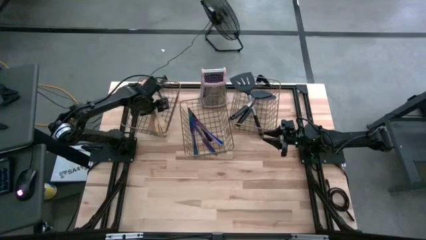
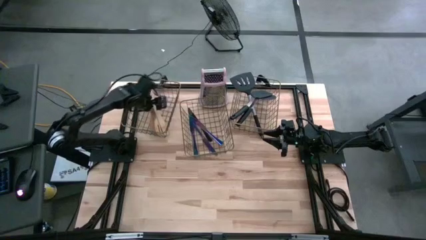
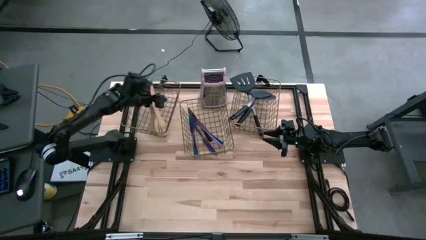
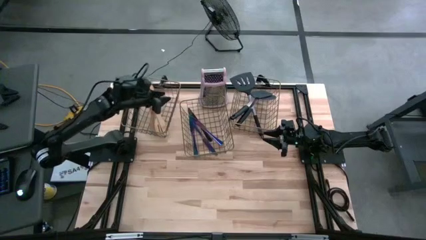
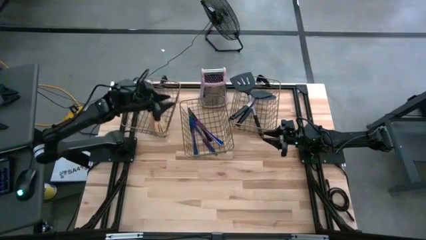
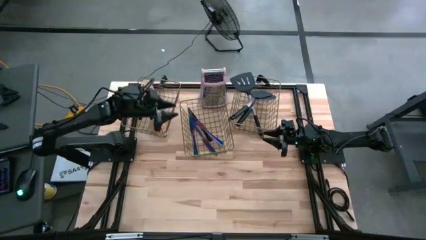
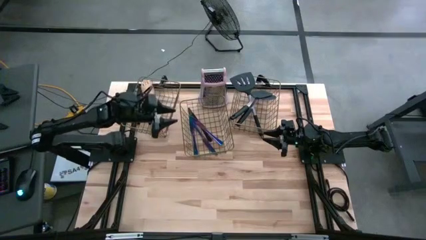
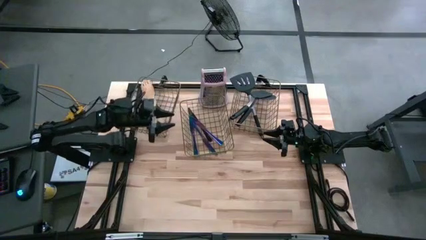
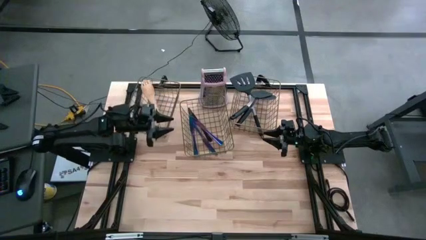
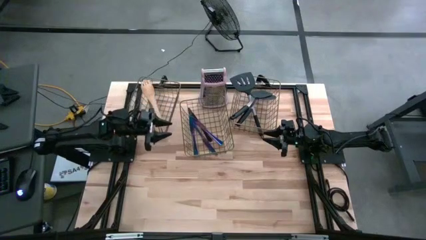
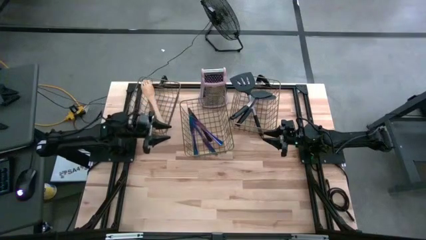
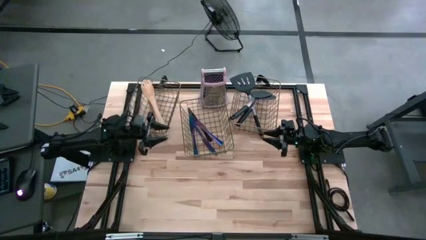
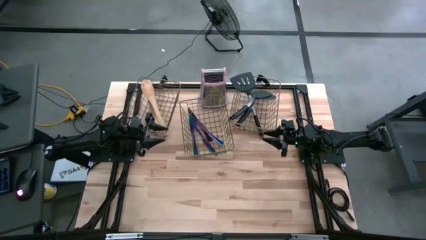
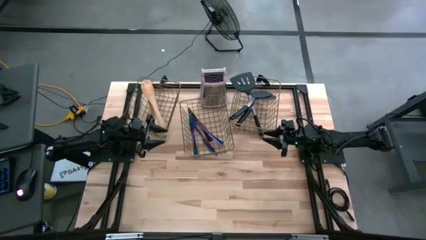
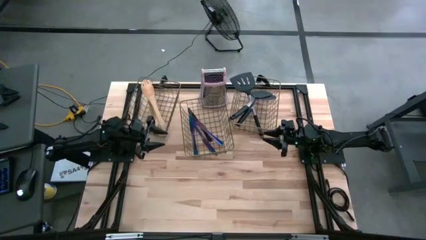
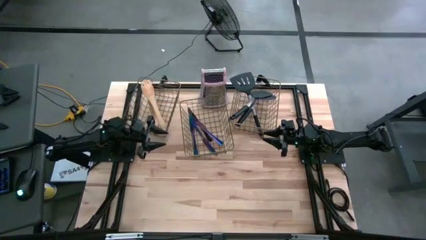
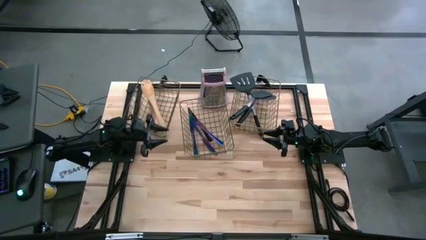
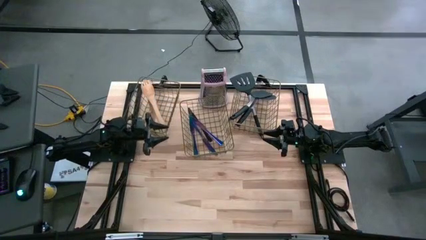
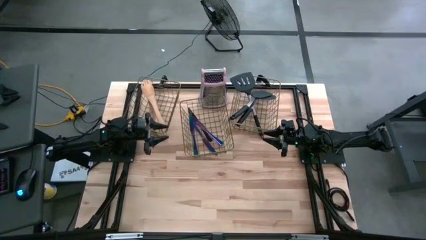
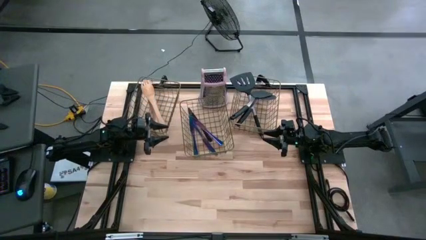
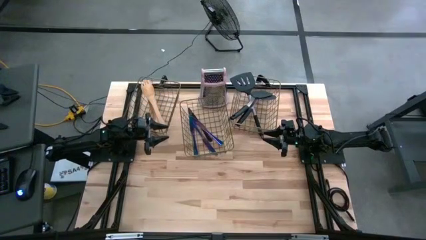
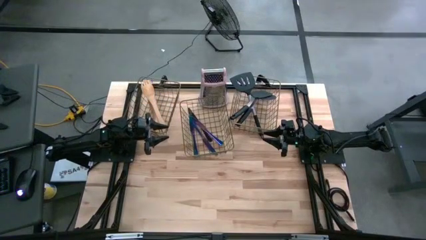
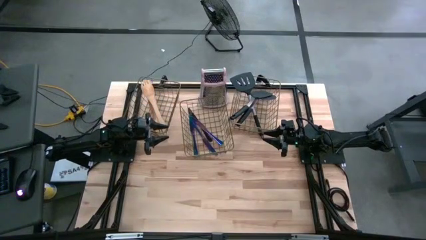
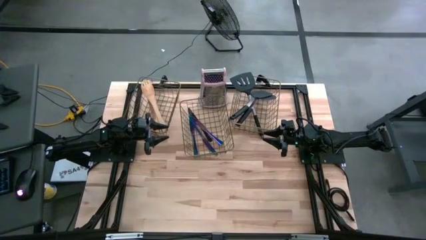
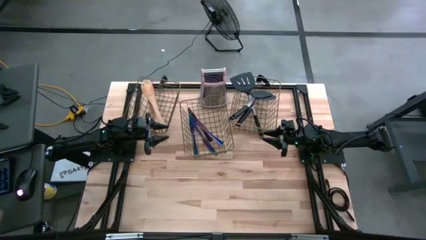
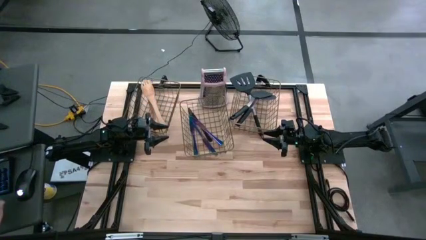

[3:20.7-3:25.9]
Task: Pick & Place Kitchen Items
Return to Home Position

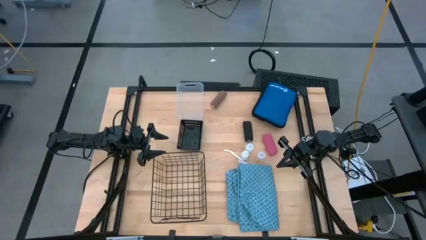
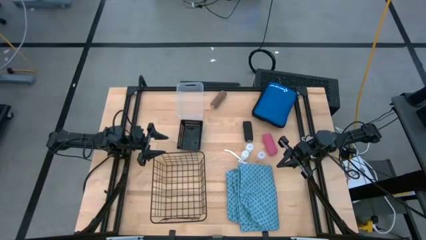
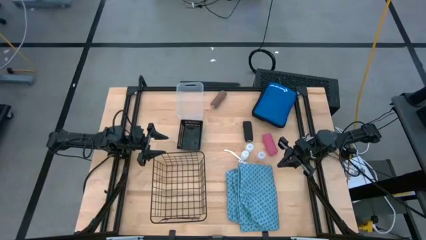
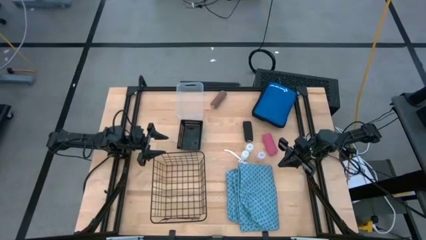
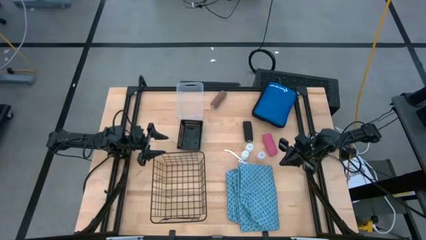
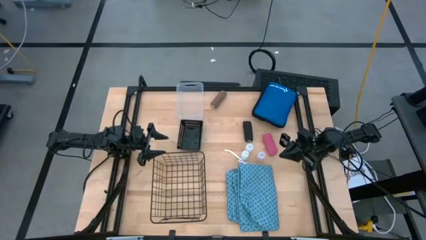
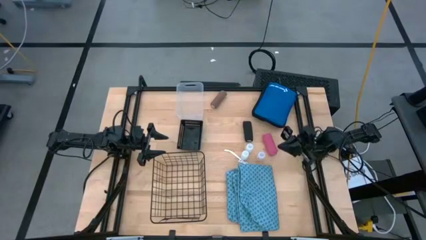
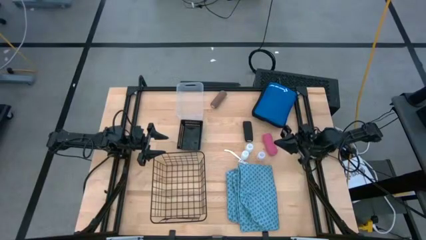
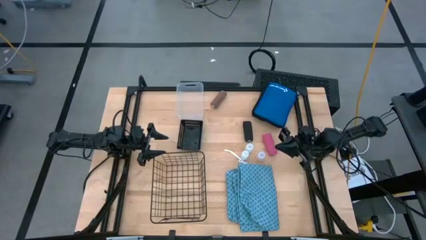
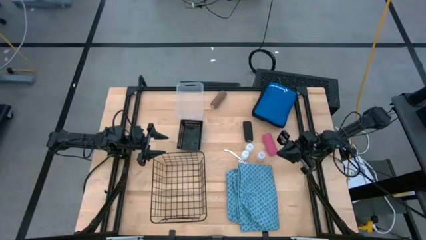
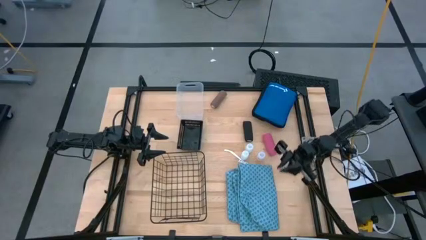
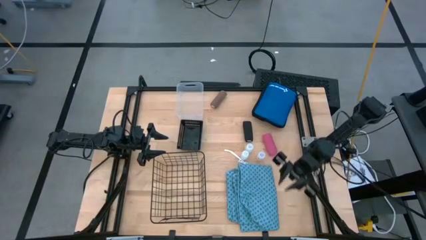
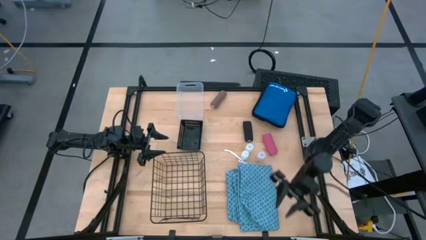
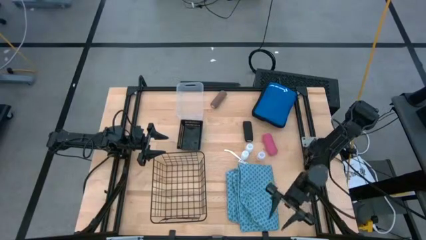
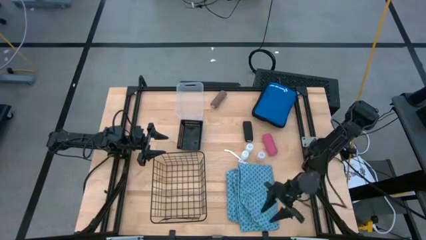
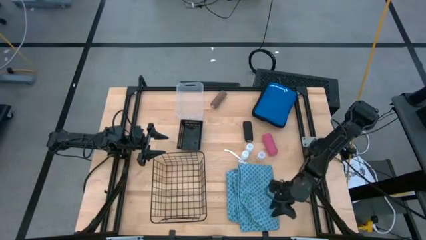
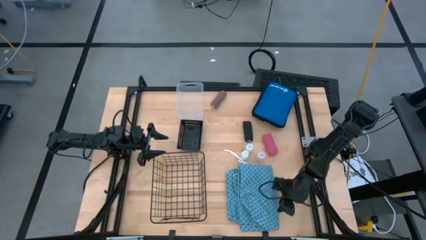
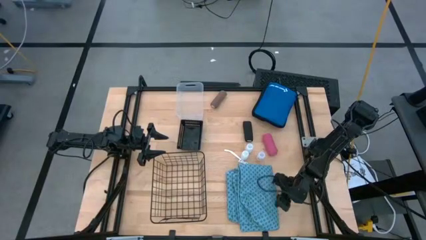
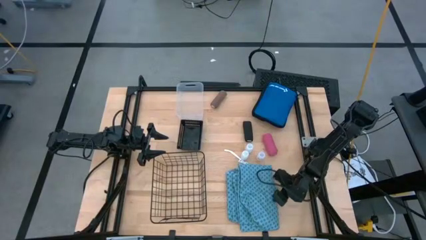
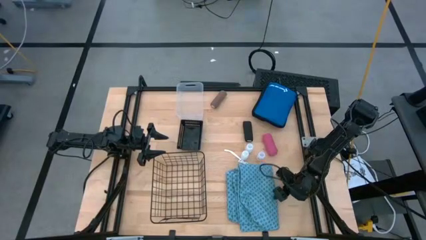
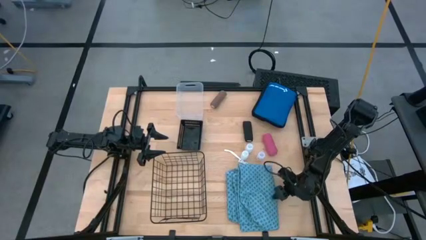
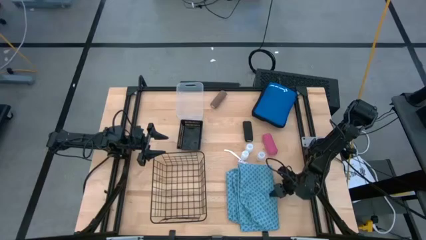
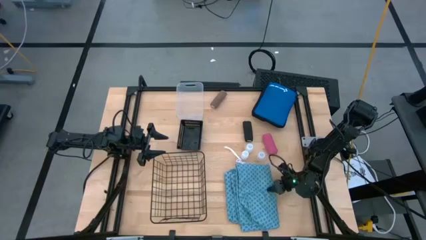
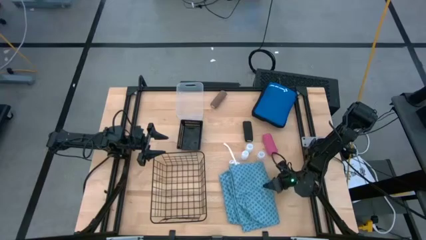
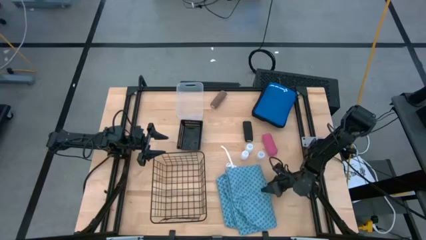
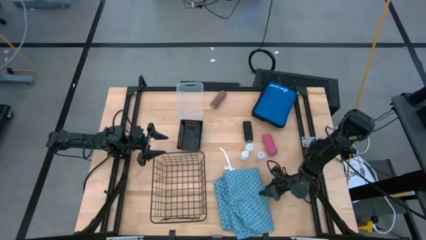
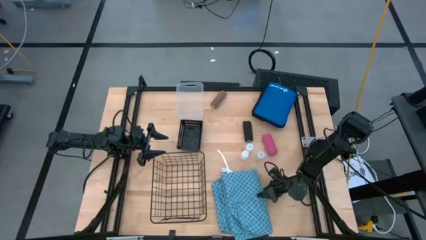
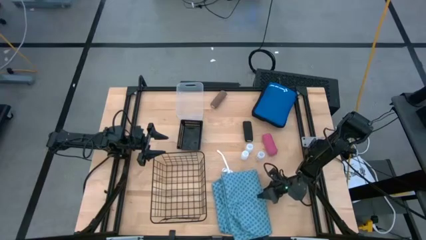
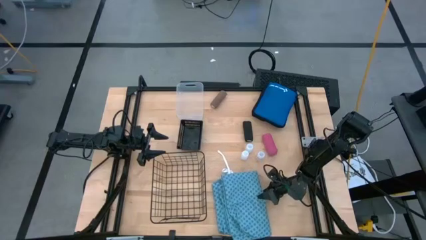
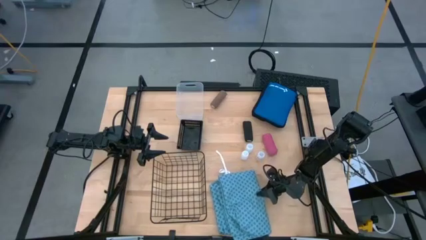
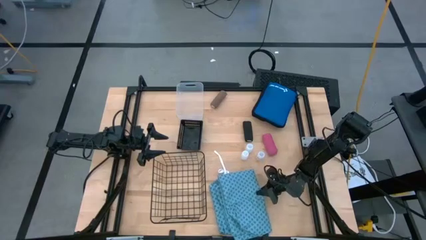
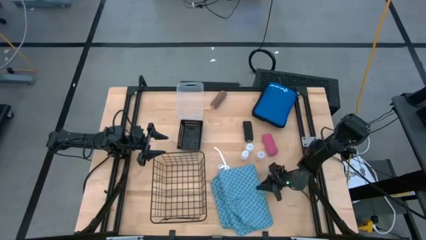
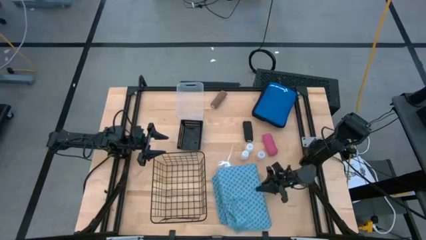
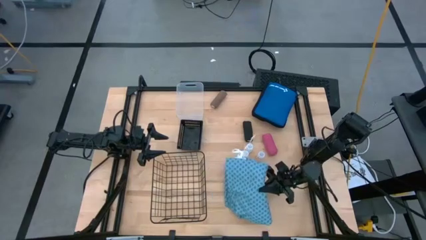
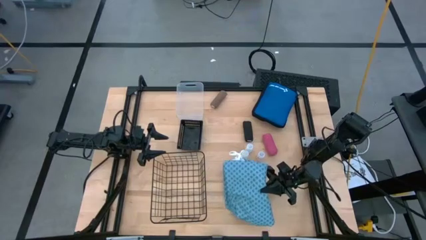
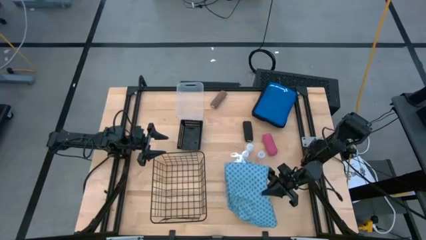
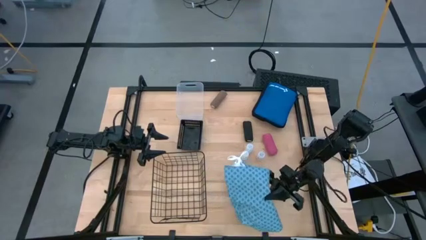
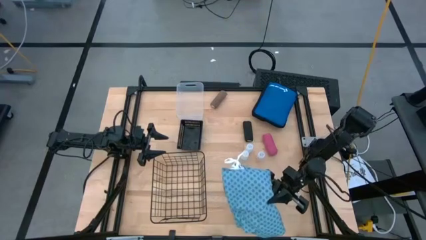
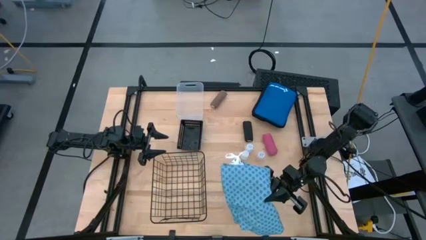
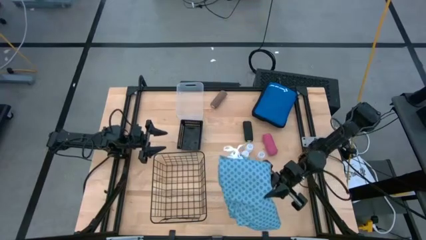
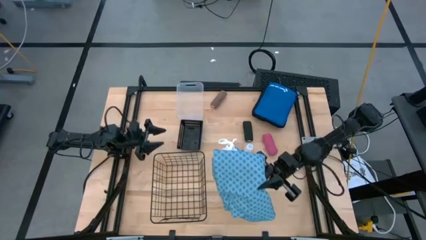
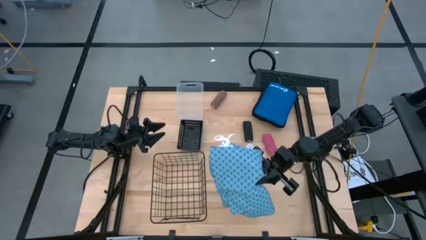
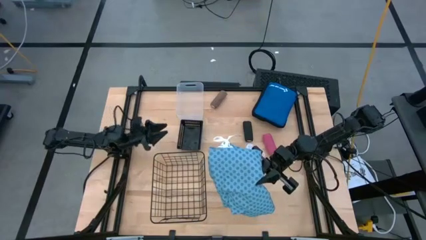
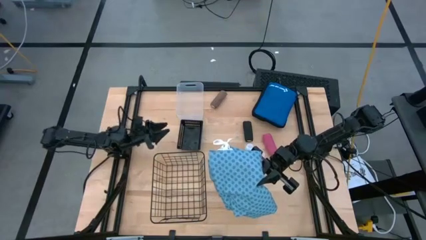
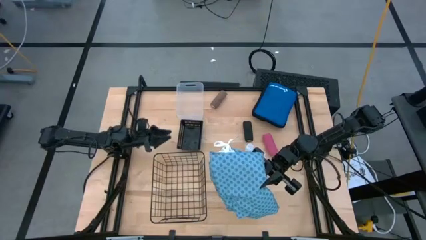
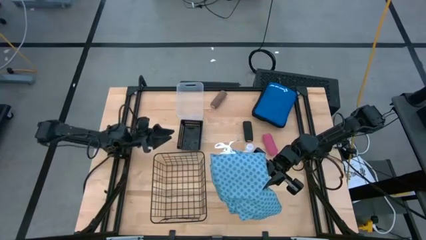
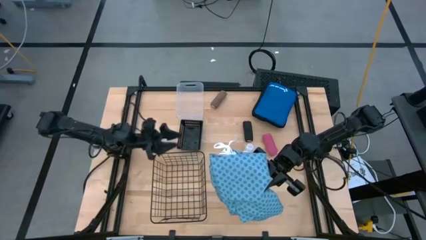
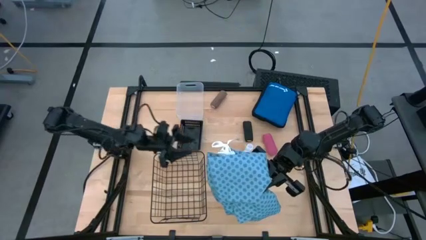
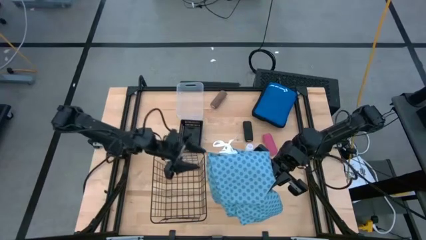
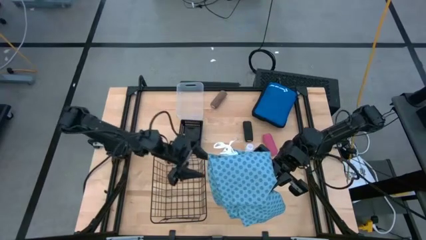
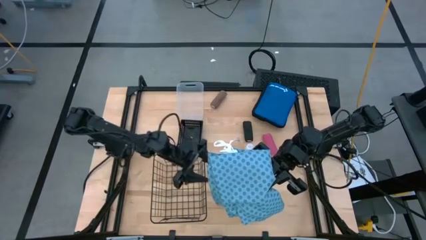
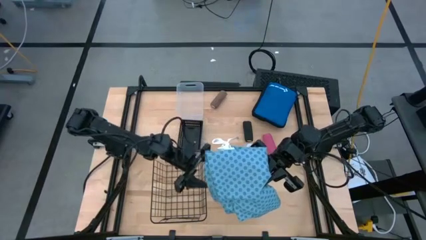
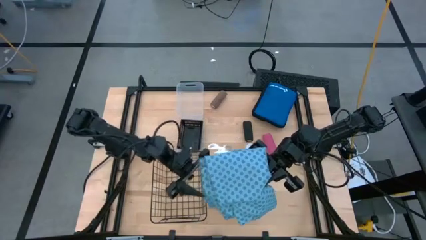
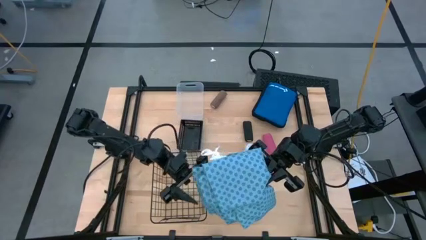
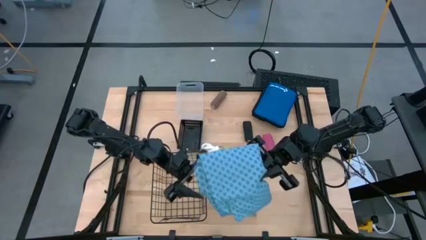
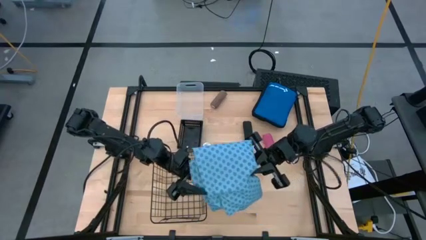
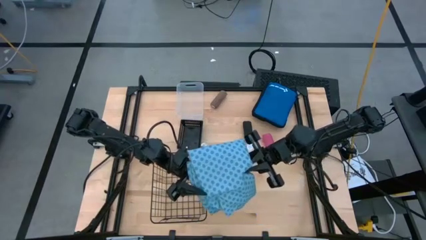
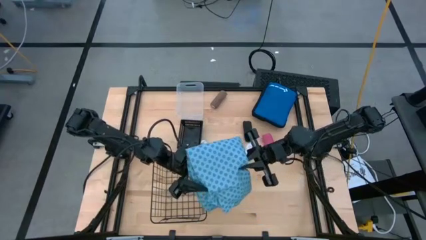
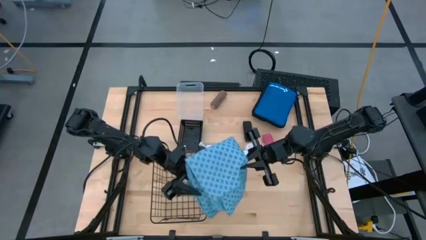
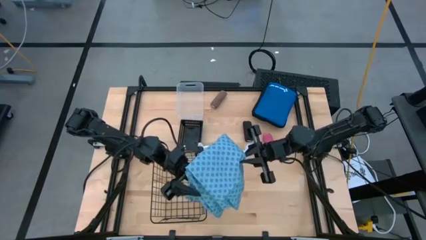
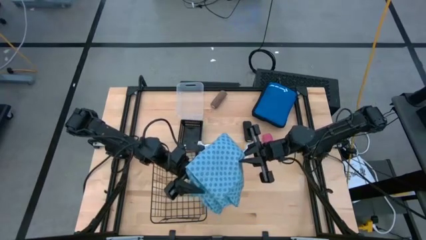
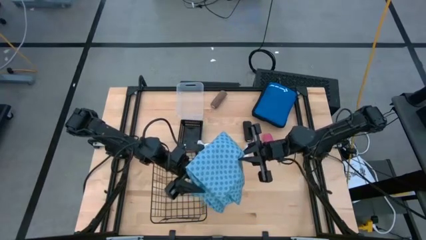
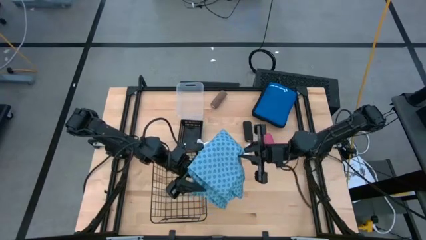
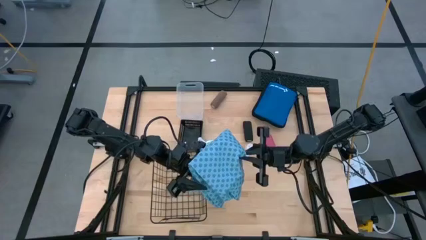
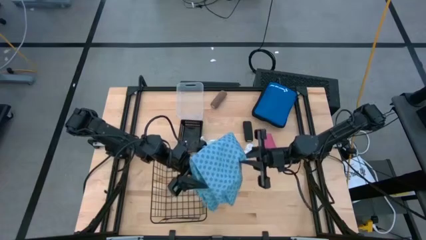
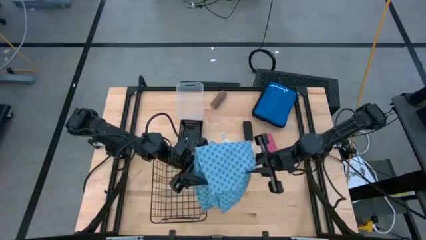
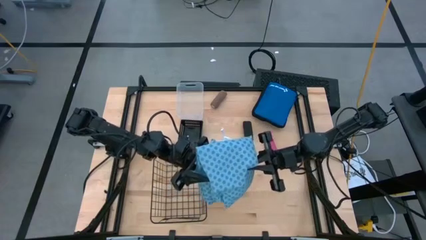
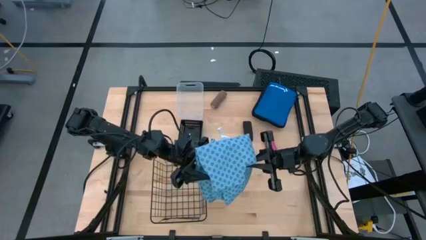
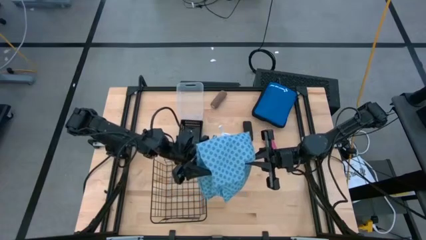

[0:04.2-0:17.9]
Task: Pick & place medical supplies in basket/bin
Put the blue patient gown into the black wire basket
